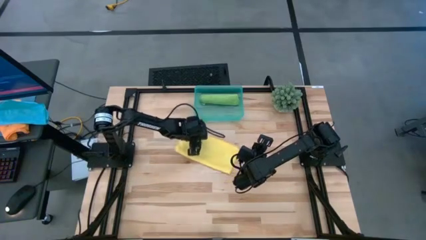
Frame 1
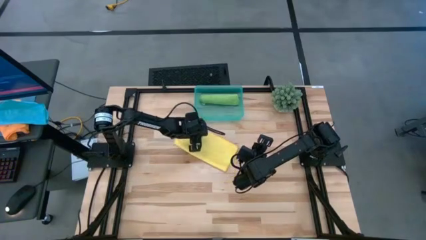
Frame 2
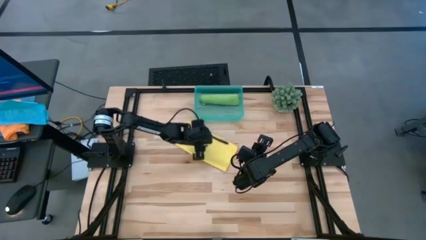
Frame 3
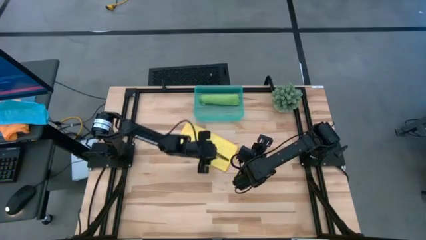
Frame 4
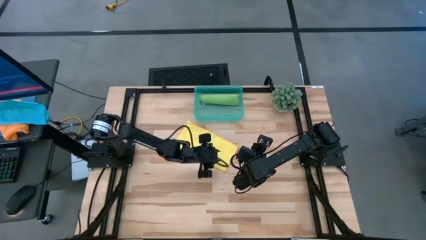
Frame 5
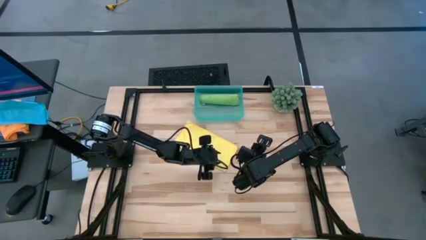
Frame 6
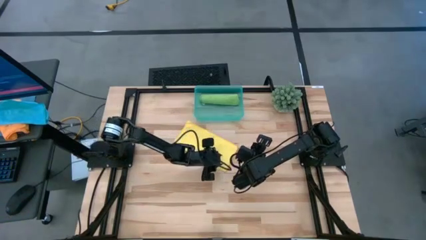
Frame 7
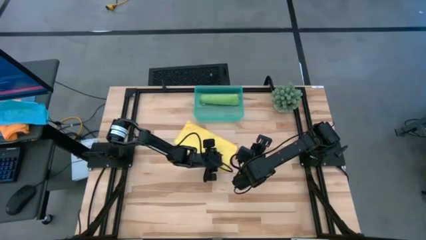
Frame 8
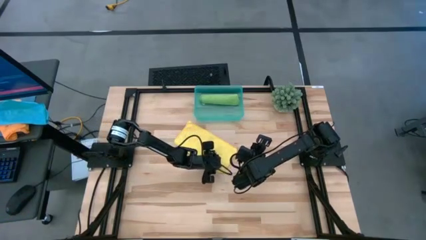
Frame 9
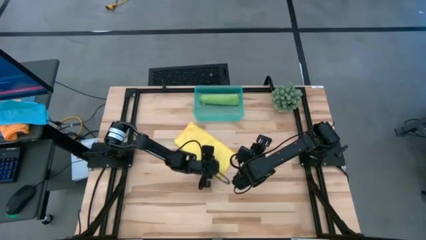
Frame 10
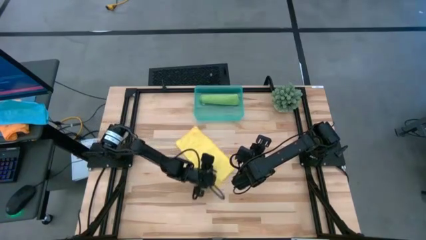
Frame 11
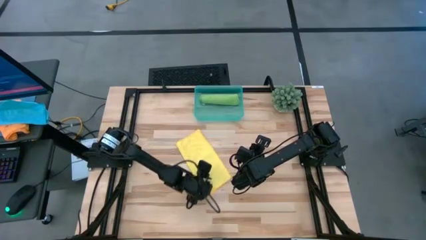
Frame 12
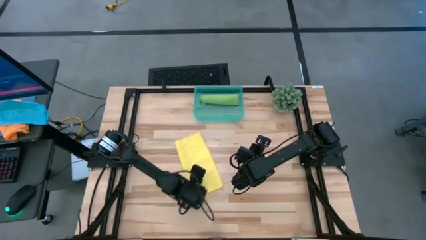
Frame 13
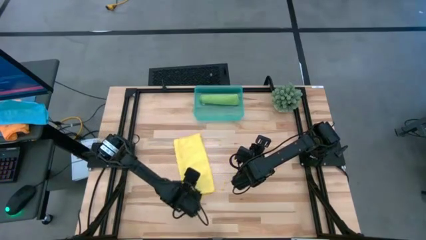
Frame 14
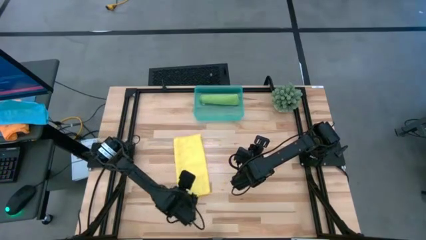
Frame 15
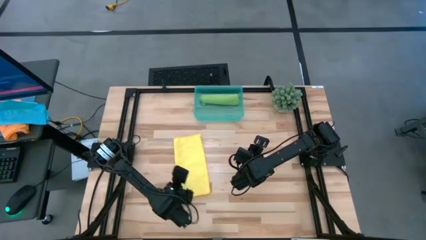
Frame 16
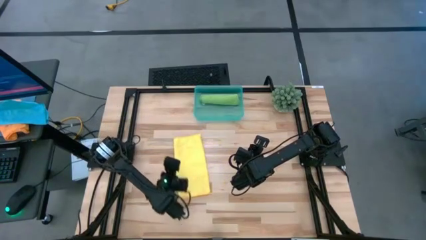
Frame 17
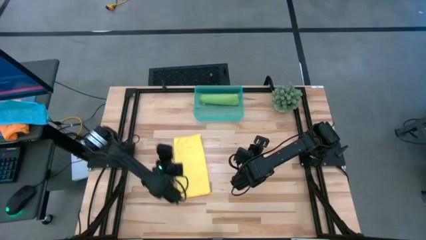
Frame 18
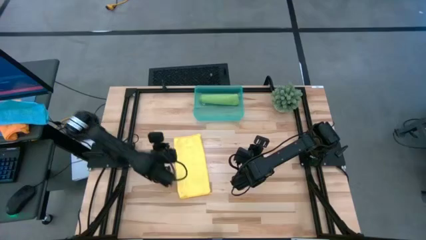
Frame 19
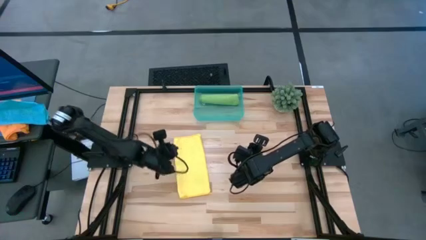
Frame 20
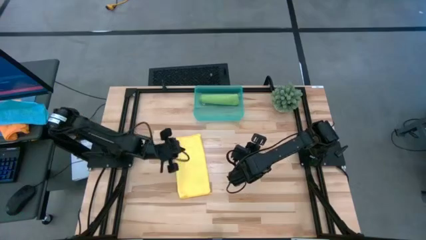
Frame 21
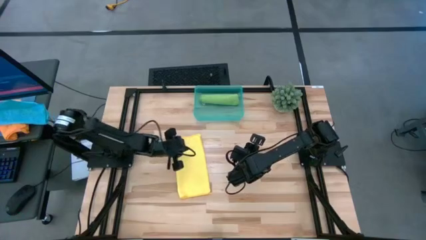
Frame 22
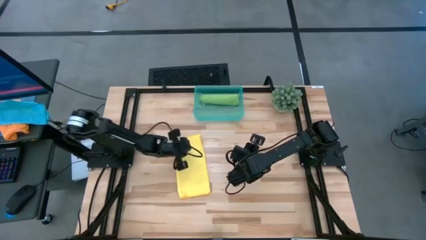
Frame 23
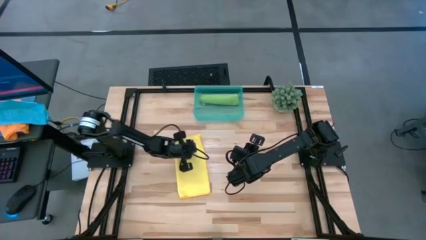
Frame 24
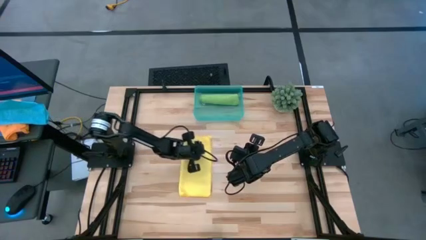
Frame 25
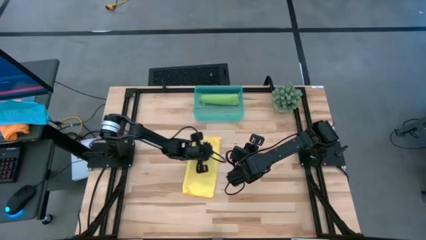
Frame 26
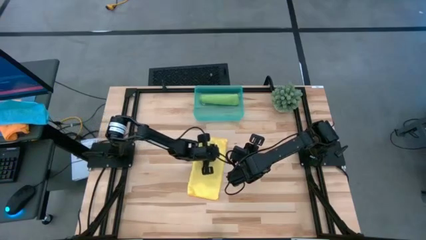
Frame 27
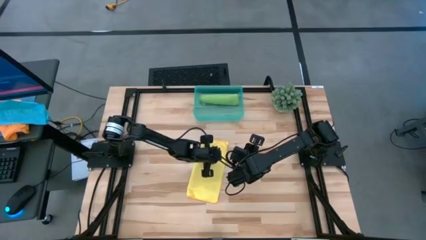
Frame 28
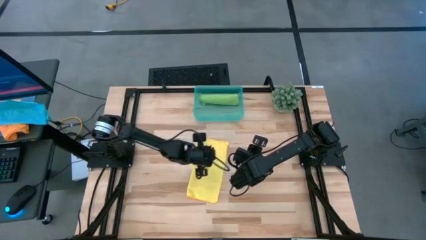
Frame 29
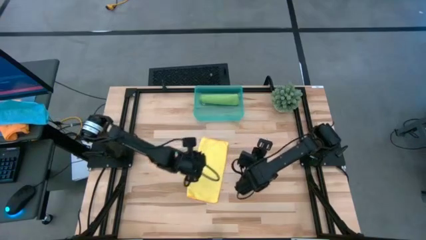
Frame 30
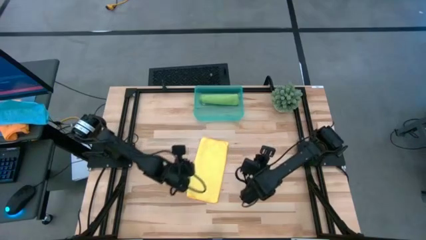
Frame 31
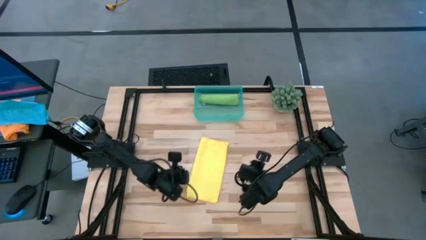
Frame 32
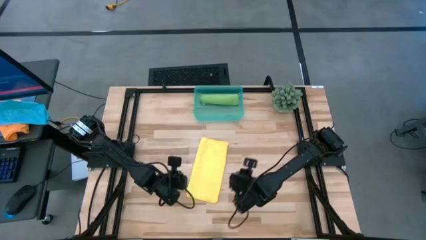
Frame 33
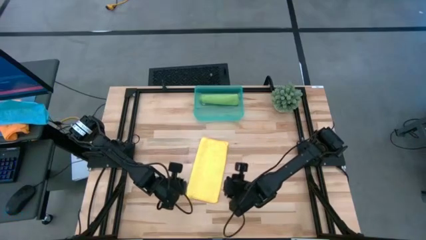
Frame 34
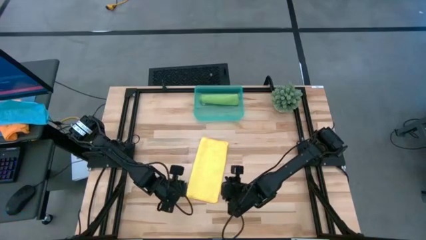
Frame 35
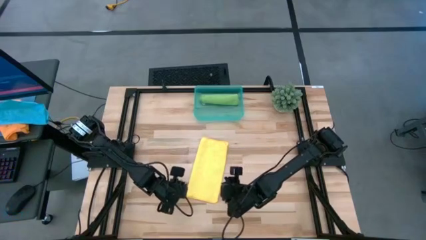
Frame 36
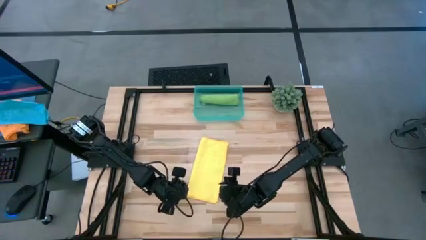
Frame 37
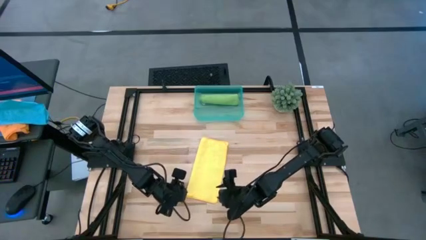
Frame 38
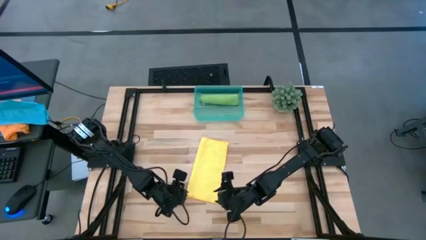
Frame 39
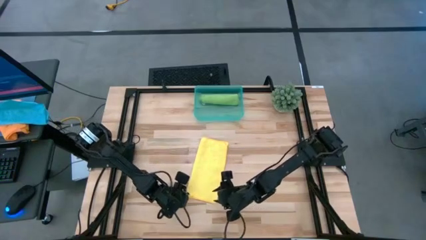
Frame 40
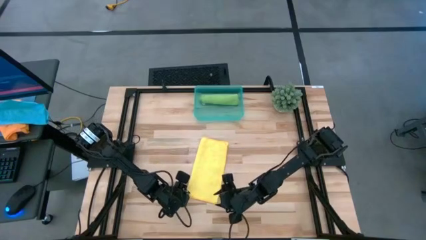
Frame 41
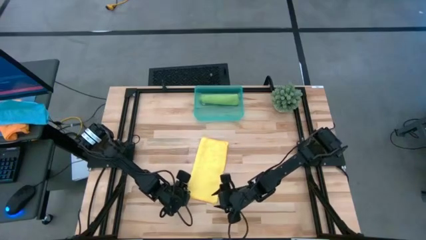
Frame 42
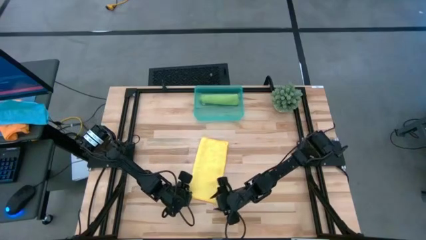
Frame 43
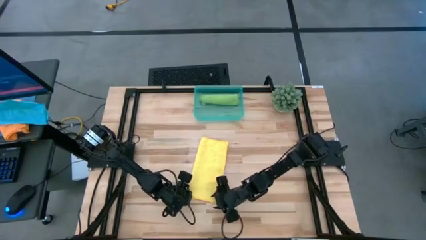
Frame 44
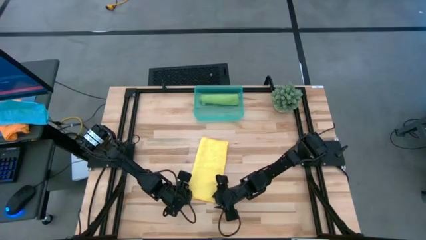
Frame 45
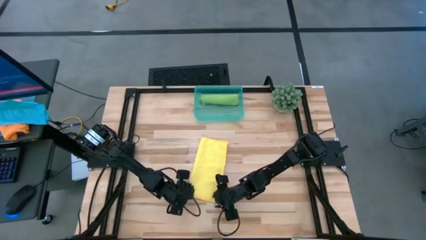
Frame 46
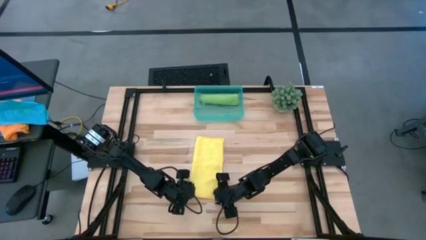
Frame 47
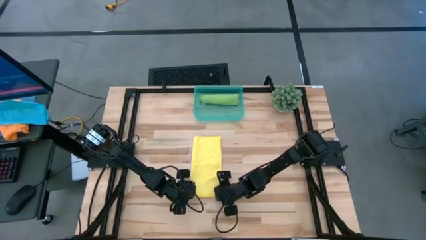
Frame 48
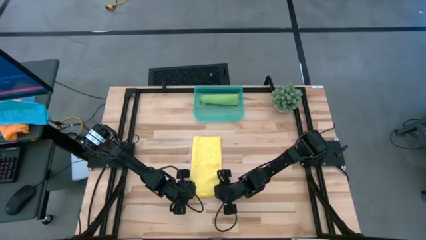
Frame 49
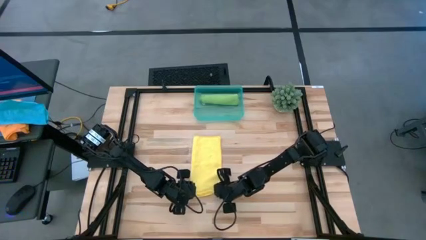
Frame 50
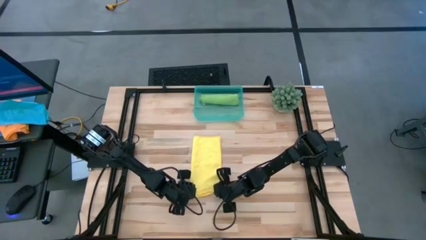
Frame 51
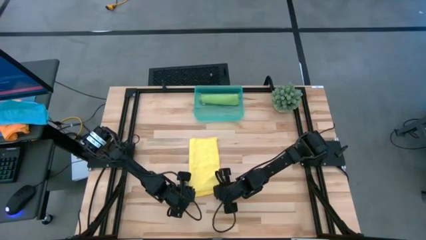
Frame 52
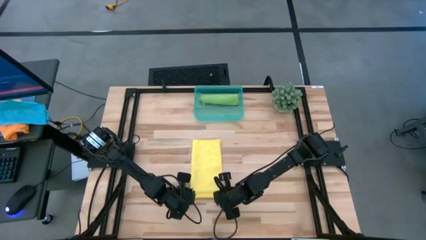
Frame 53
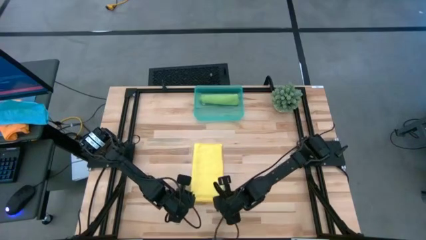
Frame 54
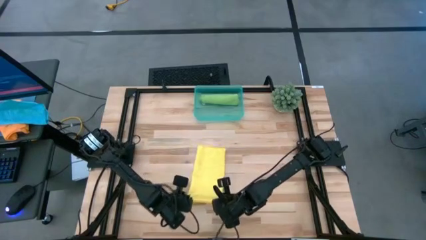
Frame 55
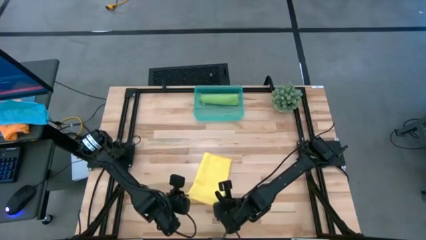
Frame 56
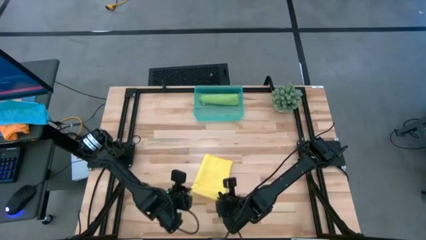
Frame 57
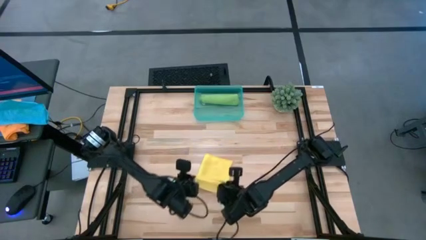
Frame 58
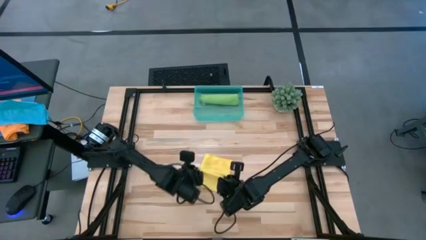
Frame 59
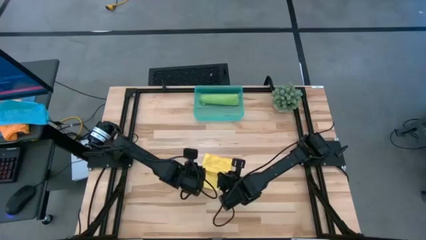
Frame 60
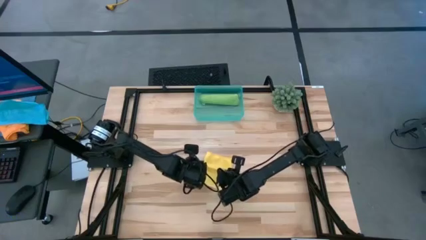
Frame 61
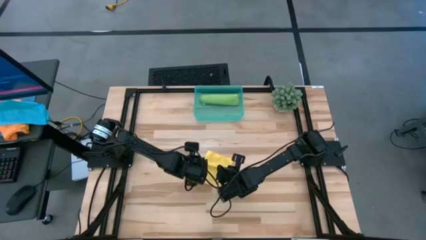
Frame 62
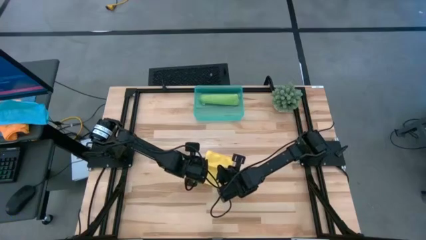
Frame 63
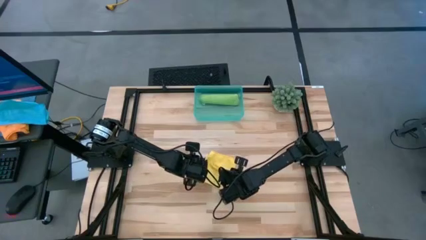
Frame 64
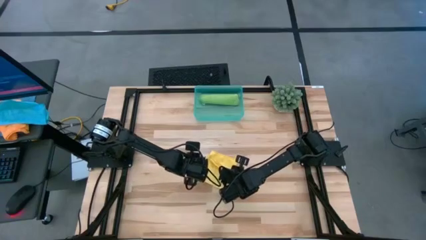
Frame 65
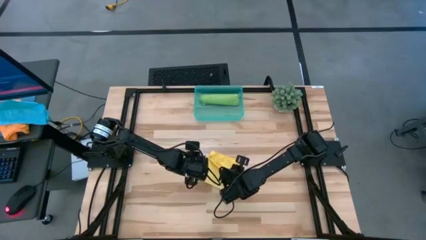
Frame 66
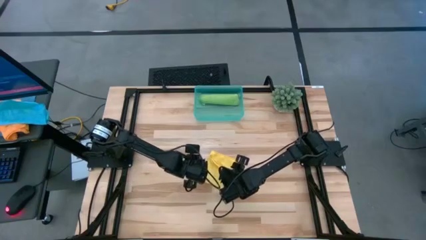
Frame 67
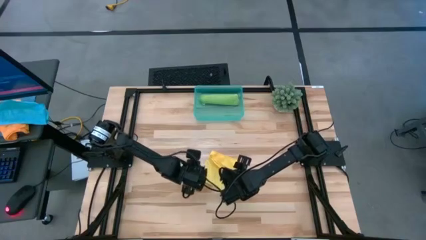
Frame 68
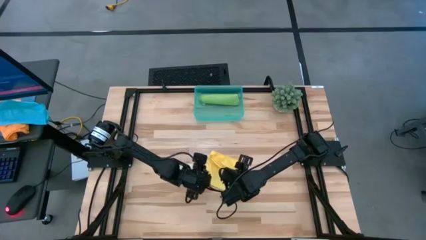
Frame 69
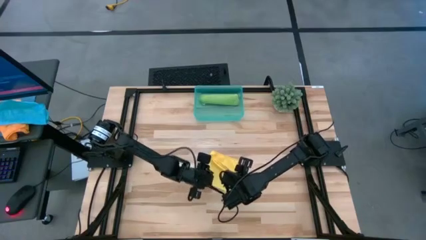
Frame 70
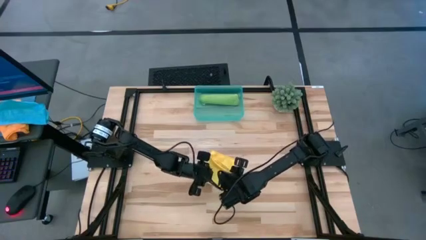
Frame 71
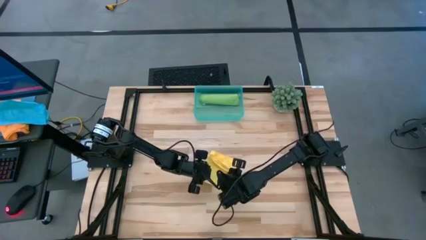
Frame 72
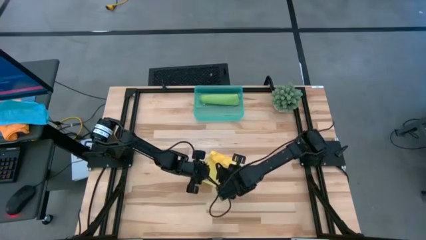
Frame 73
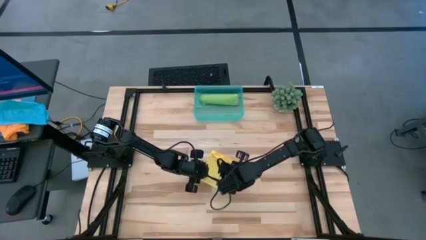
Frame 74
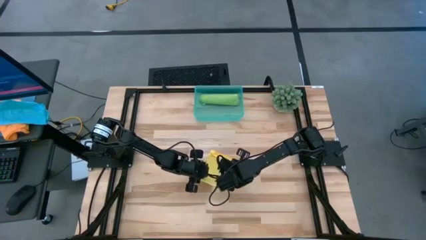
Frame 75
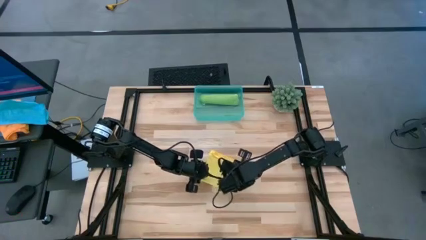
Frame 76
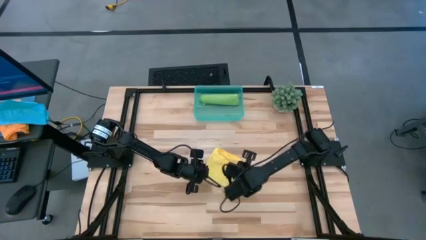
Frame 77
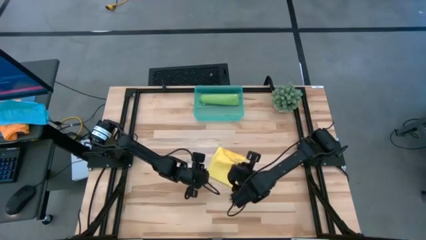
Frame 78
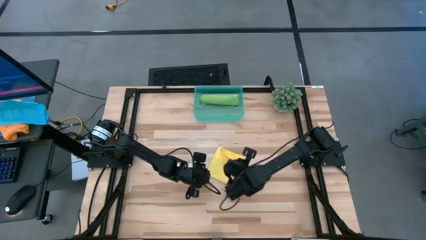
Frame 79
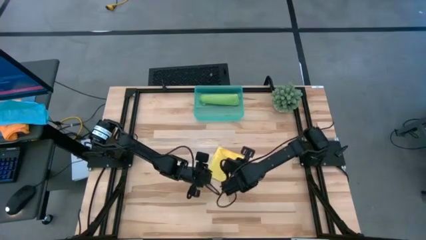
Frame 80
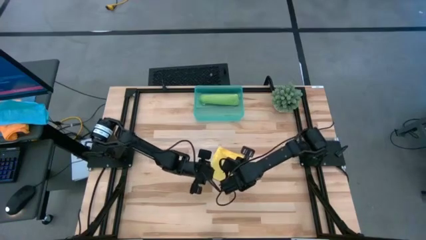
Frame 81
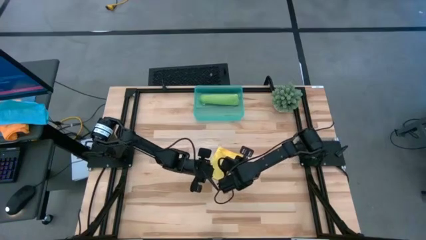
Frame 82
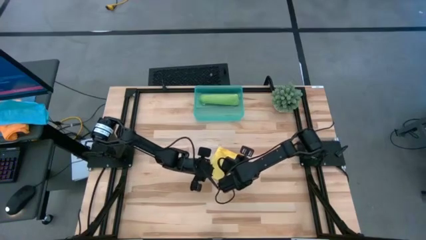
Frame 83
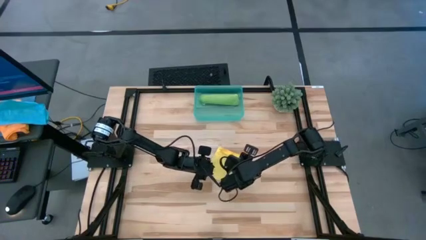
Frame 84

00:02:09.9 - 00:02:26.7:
Task: Roll microfiber towels into tight, uniform cylinder then place into a basket
Fold the yellow towel
